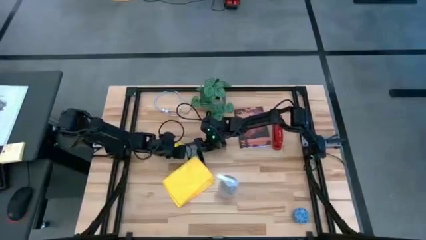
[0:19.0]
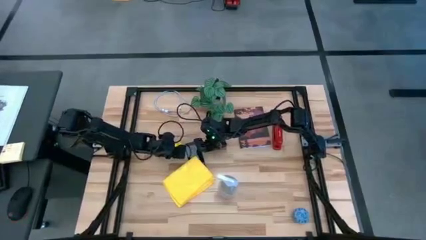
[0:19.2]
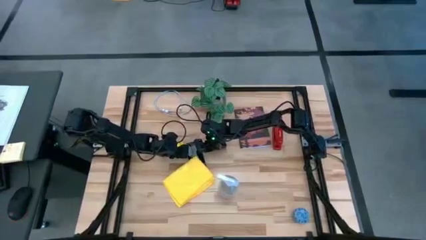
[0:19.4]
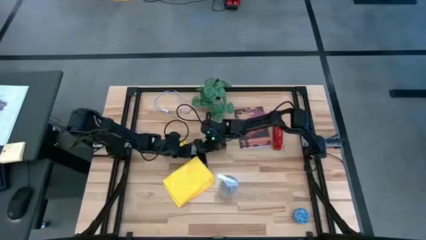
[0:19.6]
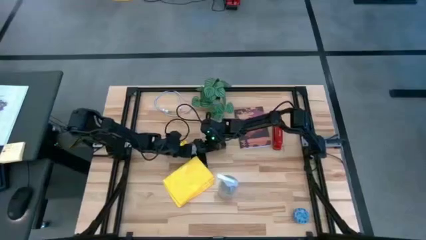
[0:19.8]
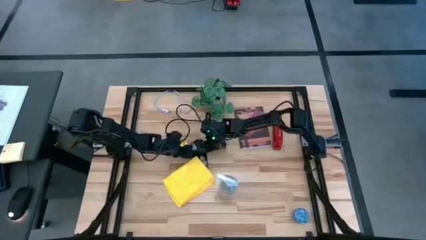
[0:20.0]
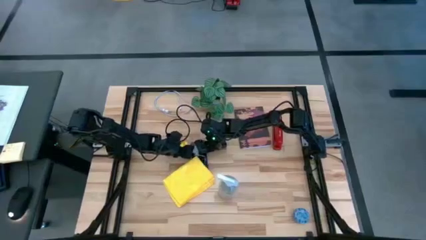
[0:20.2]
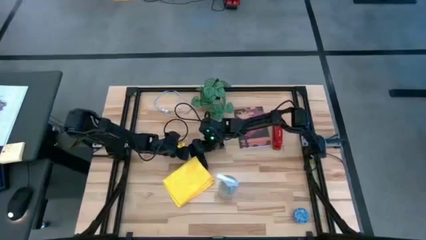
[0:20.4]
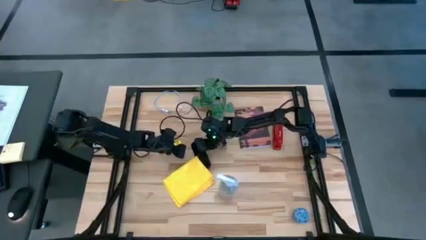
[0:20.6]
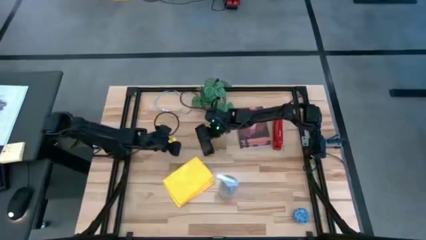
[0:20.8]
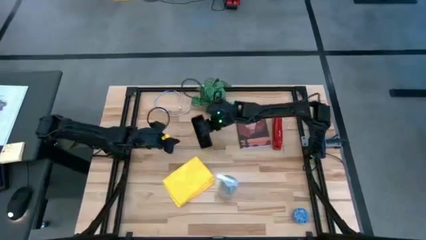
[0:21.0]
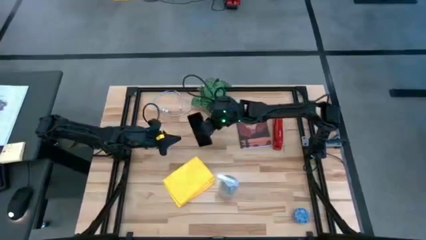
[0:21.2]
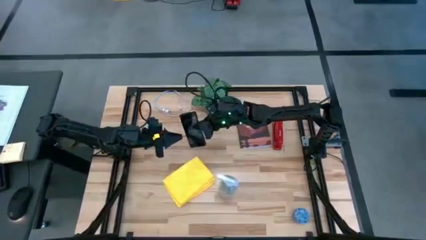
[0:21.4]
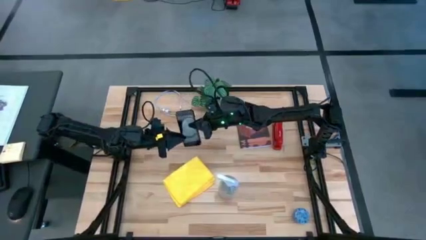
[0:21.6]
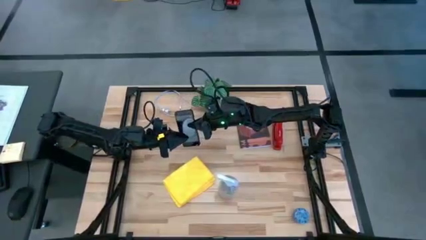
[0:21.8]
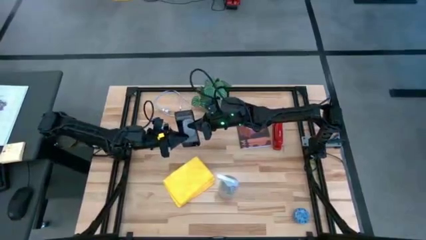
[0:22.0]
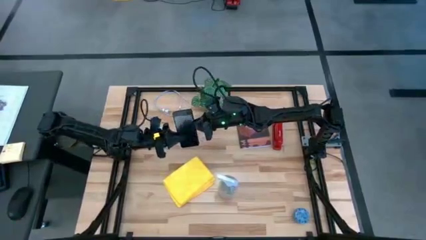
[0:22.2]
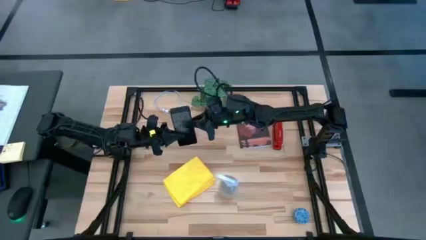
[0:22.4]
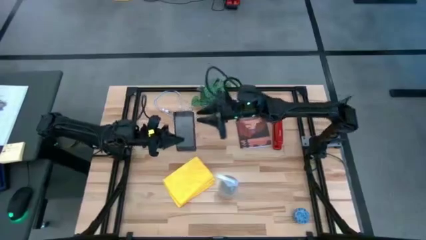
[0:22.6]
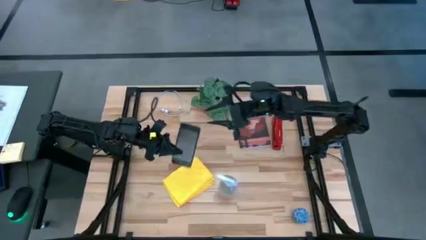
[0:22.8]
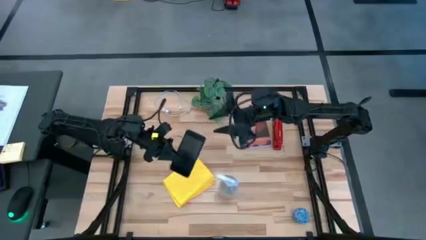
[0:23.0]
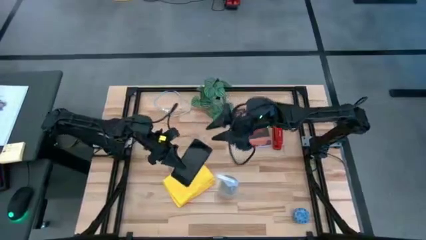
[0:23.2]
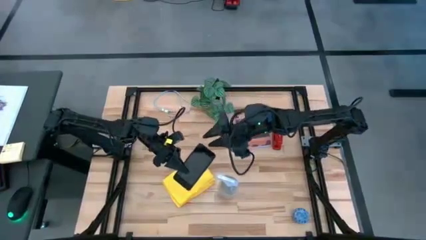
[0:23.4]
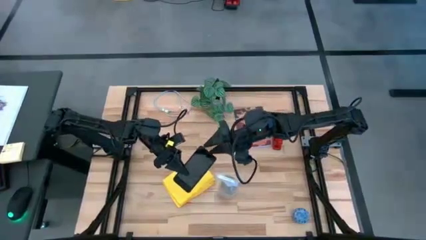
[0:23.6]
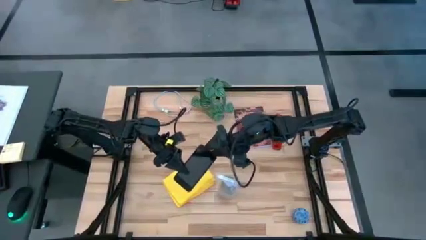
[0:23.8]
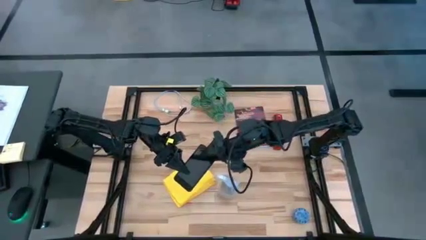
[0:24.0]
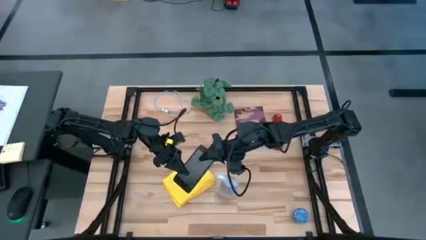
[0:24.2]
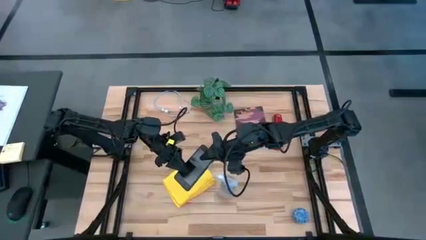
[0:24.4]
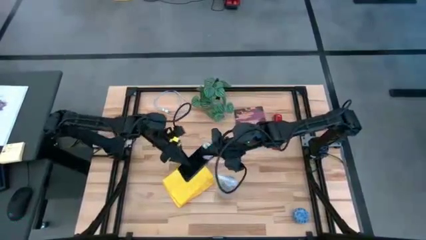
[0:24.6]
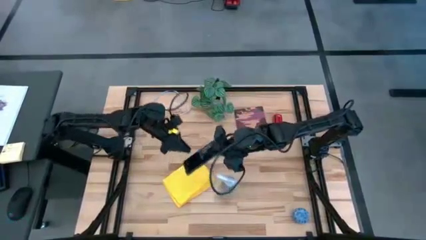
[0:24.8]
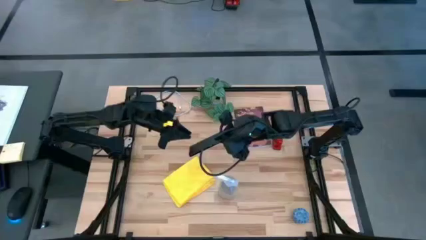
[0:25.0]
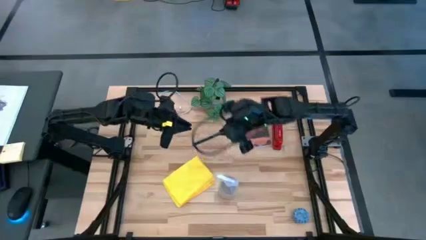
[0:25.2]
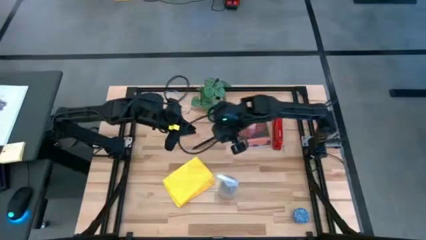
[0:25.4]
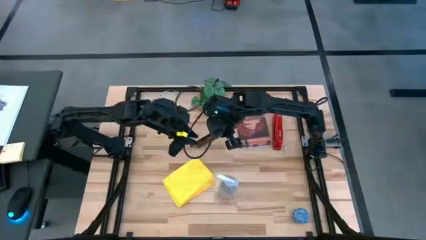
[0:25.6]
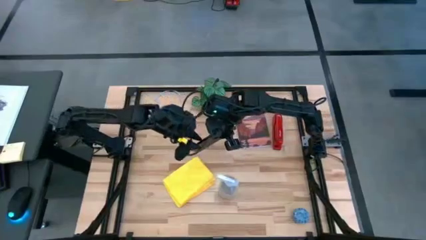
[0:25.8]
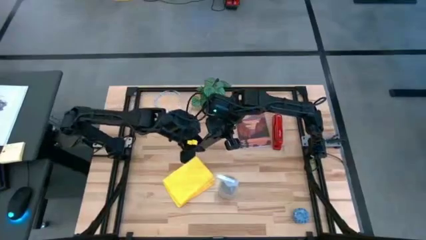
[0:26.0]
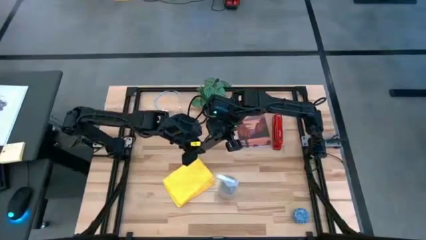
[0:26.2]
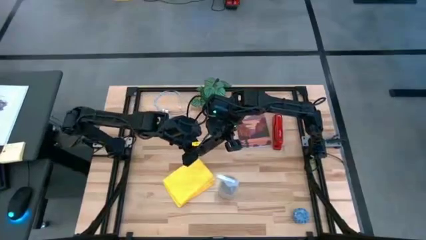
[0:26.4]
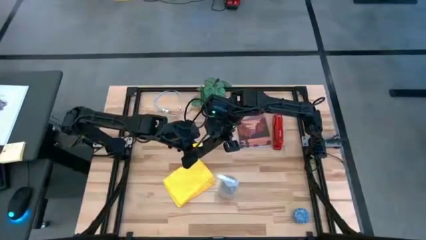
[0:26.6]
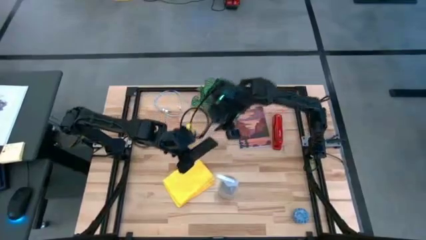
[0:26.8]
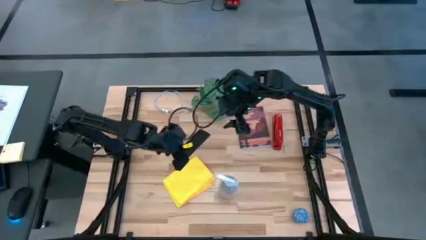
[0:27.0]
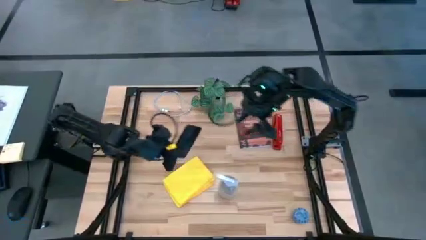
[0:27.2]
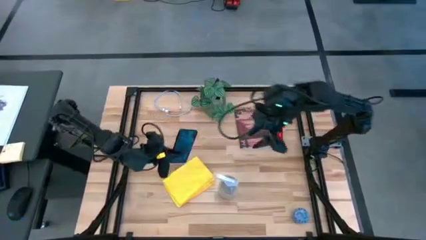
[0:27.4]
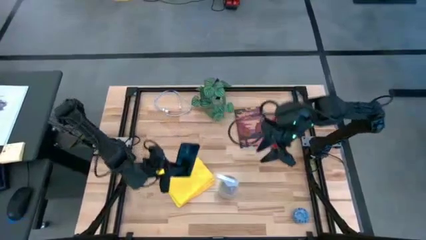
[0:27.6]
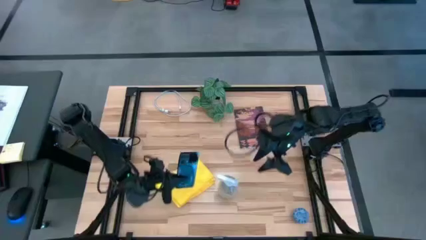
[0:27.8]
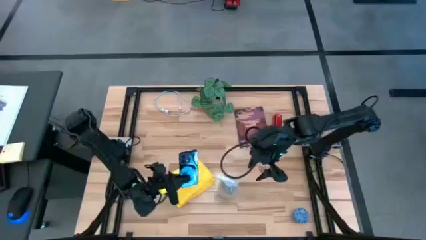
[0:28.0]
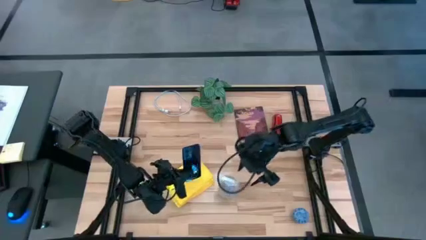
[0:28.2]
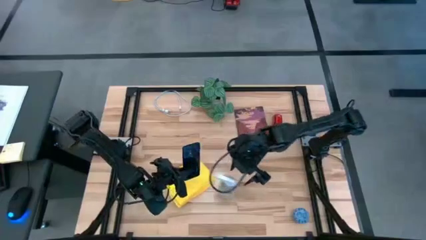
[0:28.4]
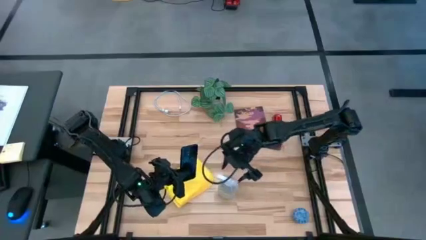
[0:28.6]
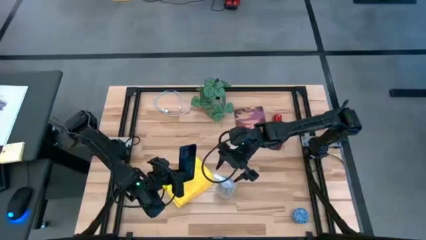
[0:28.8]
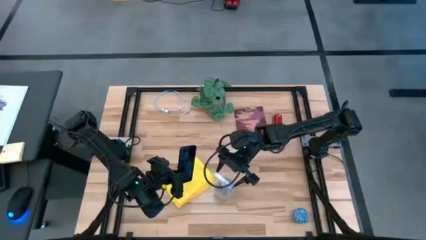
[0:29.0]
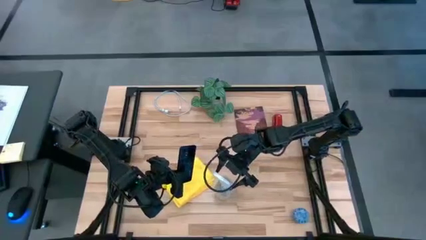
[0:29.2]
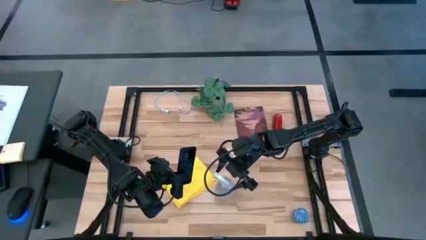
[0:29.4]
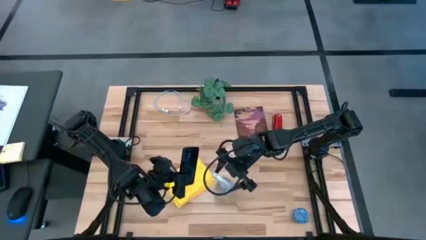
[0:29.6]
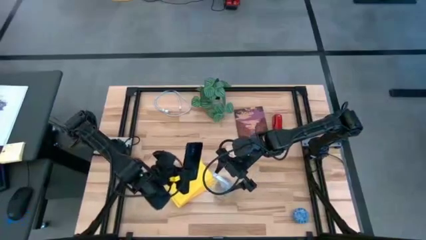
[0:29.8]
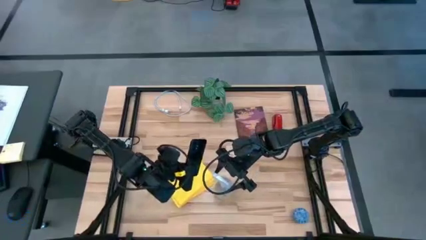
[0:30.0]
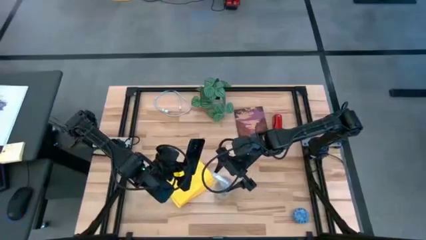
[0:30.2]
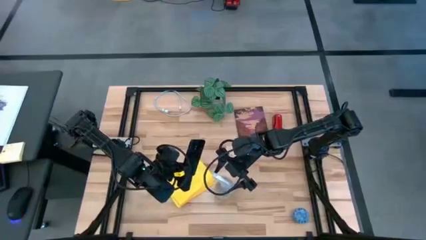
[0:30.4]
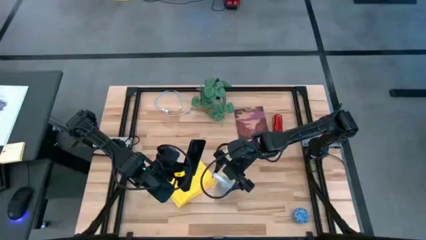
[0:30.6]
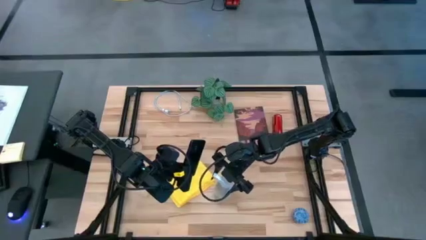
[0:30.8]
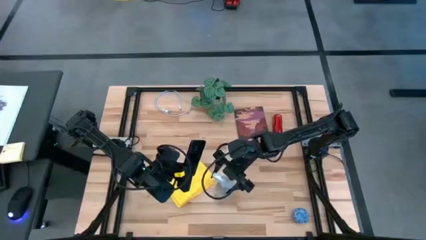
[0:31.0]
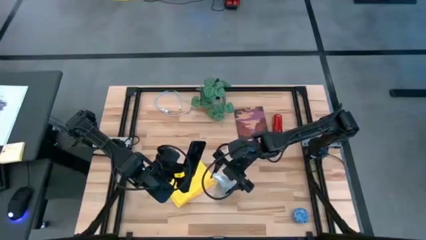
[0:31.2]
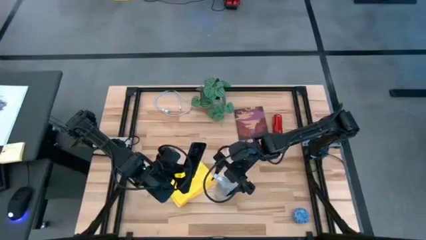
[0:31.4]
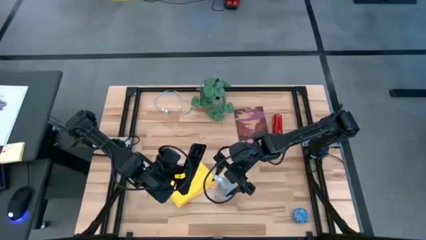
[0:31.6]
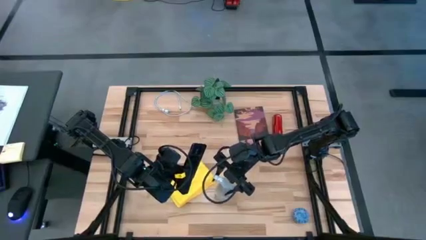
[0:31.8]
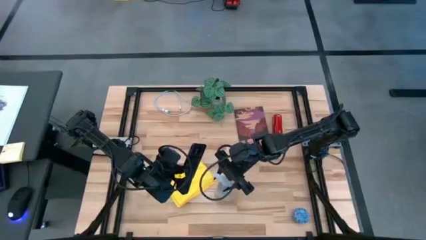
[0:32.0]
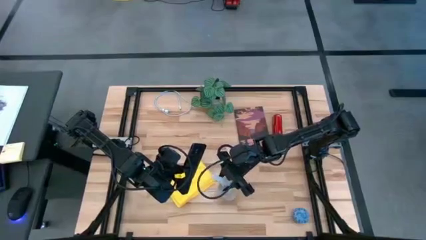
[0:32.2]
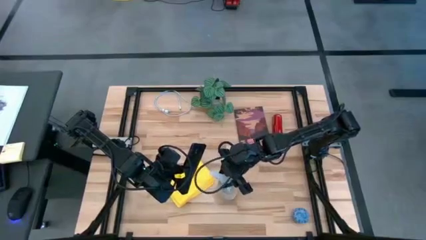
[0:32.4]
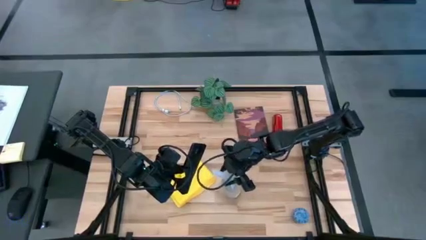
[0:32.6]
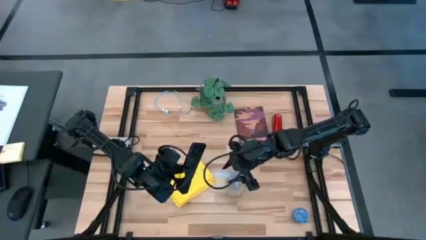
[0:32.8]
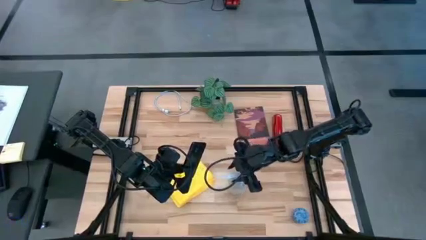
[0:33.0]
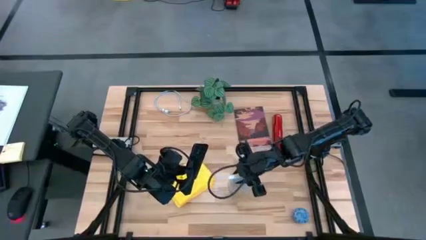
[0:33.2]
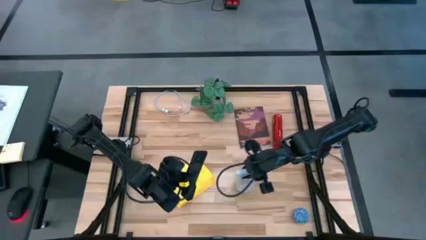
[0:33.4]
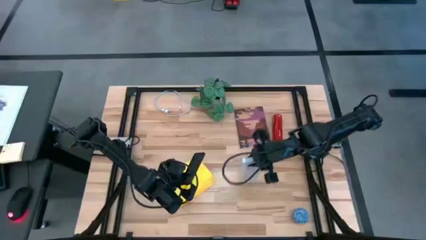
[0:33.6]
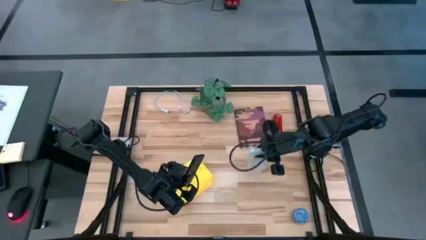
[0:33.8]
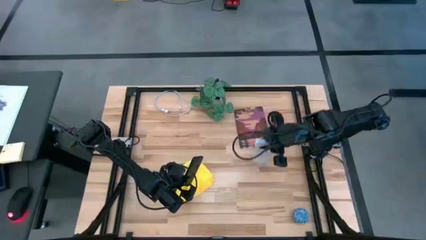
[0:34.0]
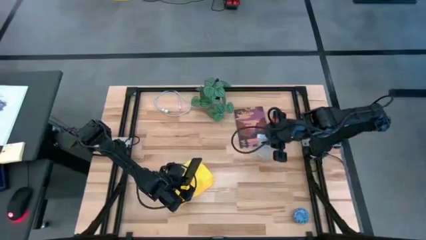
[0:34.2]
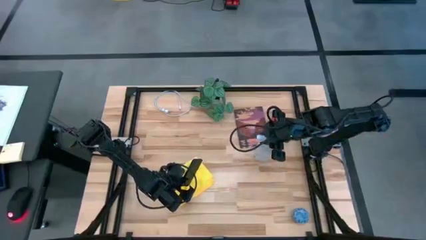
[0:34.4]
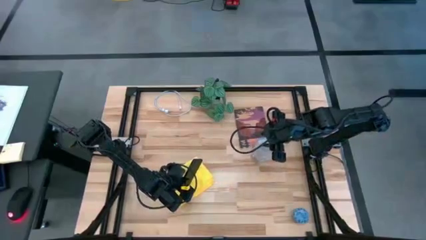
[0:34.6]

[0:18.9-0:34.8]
Task: Apply microfiber cloth
Spray the back of the black cellphone with the transparent spray bottle
